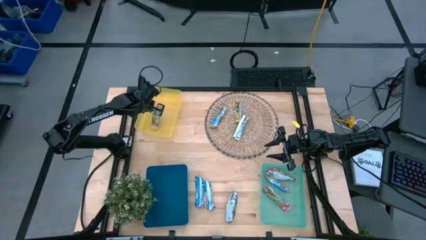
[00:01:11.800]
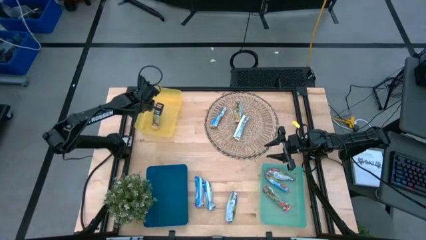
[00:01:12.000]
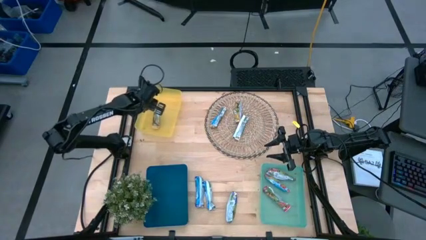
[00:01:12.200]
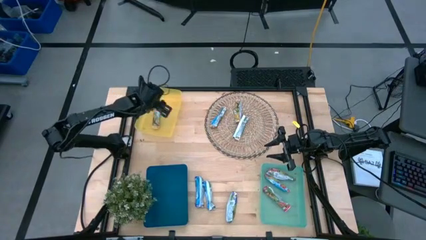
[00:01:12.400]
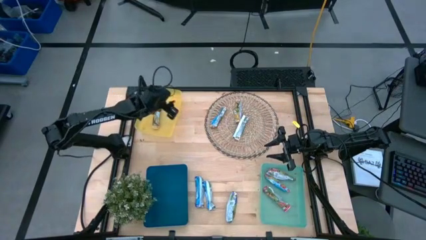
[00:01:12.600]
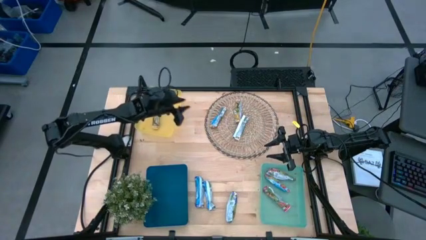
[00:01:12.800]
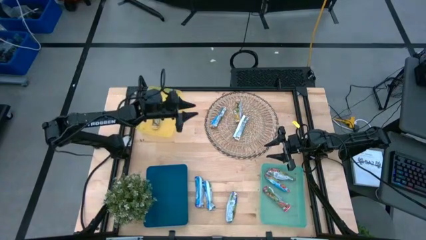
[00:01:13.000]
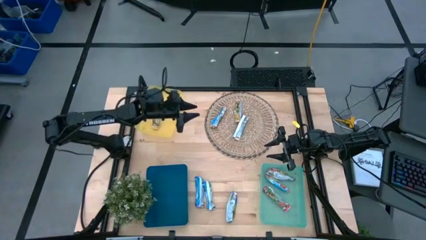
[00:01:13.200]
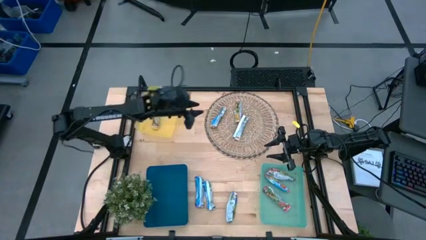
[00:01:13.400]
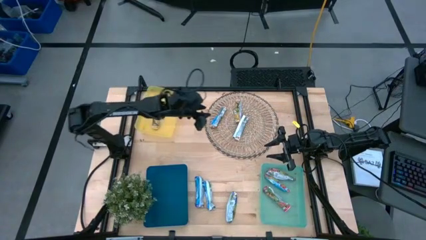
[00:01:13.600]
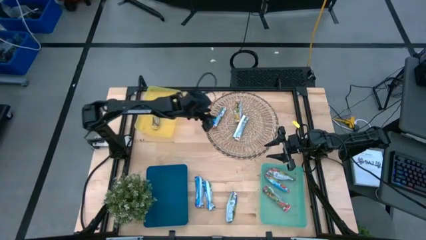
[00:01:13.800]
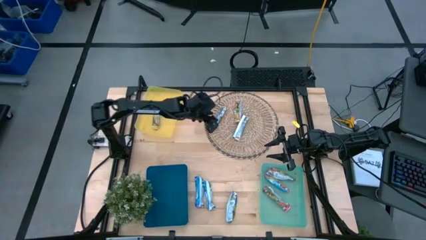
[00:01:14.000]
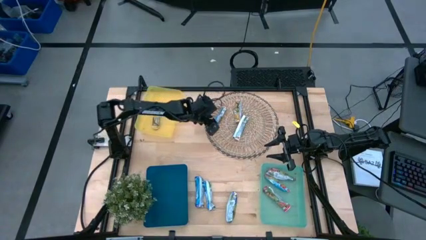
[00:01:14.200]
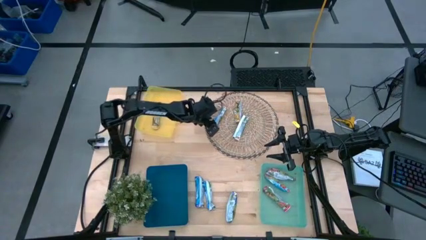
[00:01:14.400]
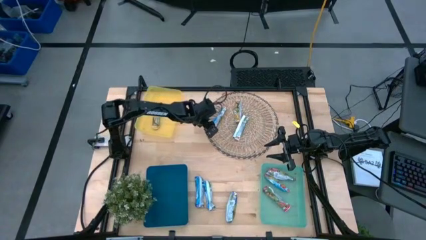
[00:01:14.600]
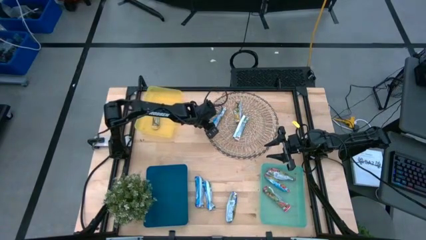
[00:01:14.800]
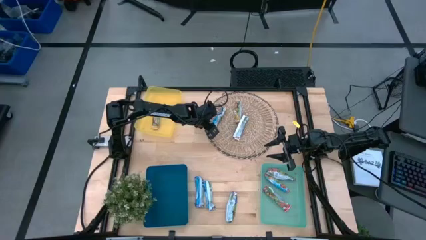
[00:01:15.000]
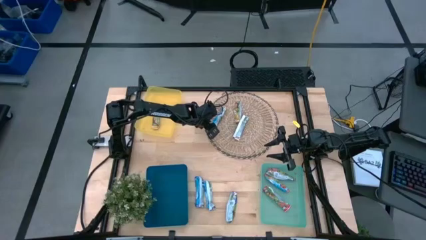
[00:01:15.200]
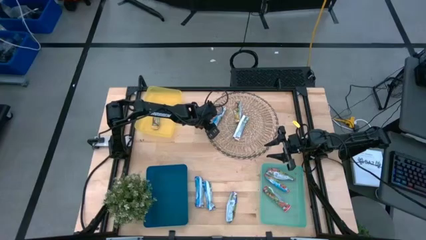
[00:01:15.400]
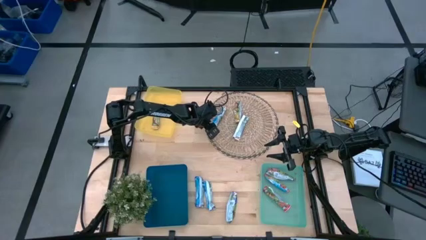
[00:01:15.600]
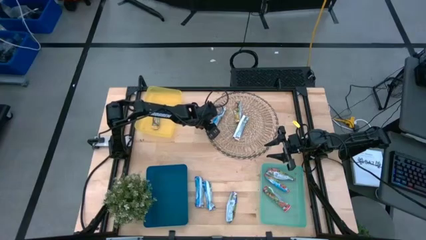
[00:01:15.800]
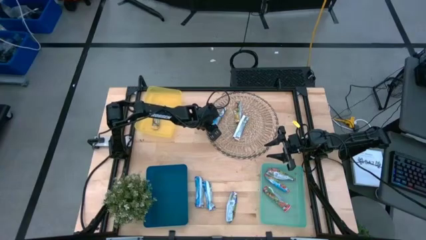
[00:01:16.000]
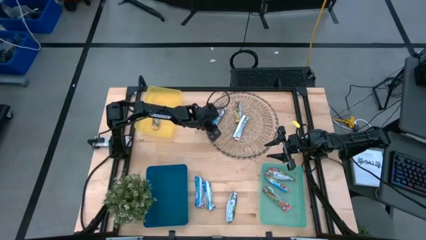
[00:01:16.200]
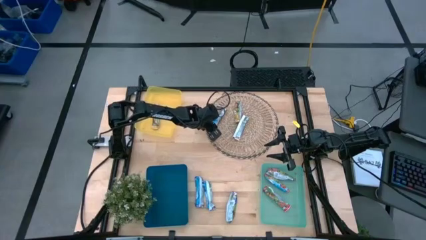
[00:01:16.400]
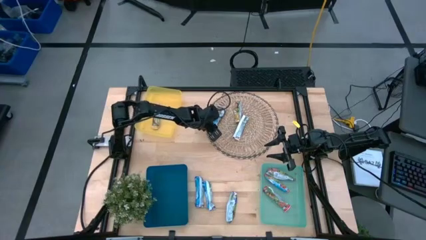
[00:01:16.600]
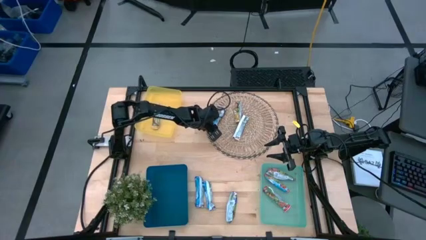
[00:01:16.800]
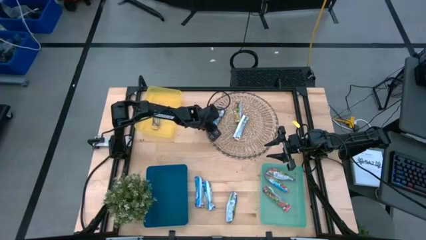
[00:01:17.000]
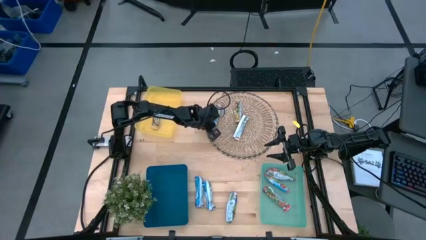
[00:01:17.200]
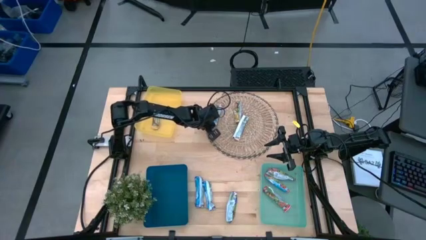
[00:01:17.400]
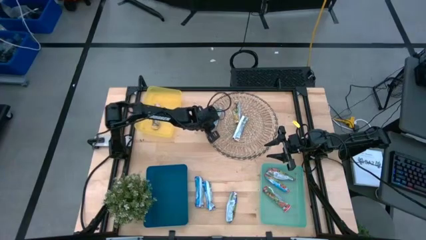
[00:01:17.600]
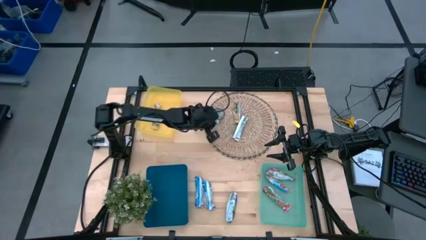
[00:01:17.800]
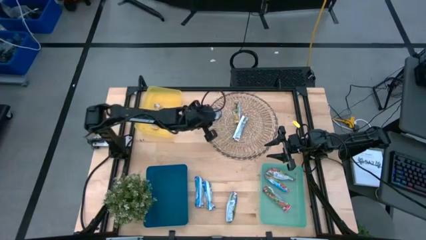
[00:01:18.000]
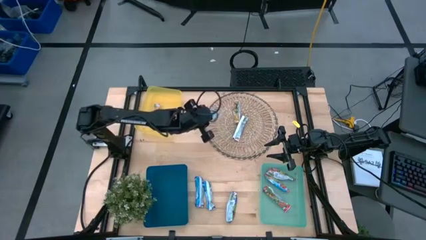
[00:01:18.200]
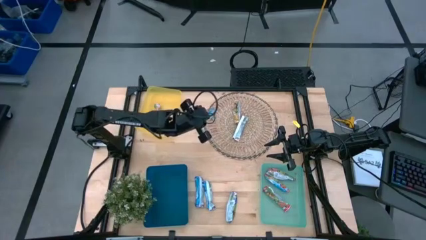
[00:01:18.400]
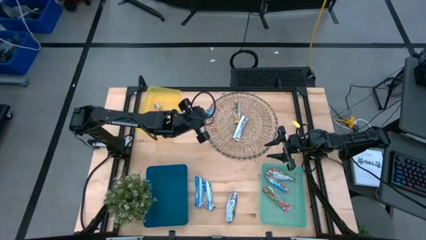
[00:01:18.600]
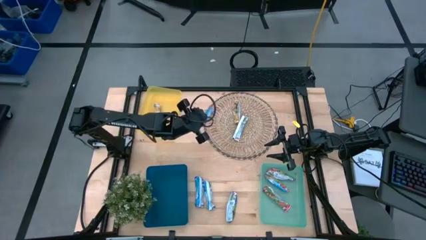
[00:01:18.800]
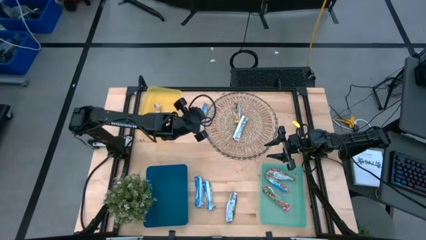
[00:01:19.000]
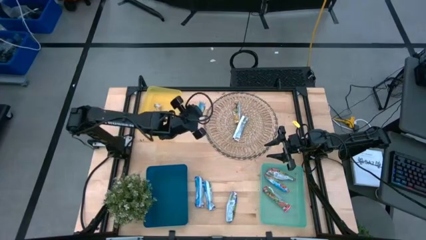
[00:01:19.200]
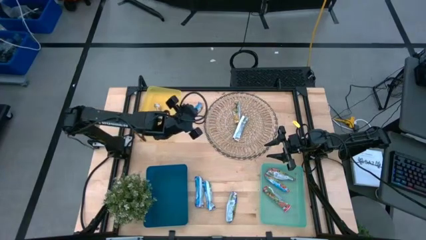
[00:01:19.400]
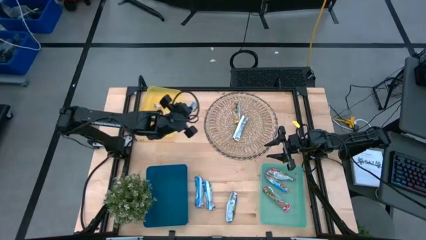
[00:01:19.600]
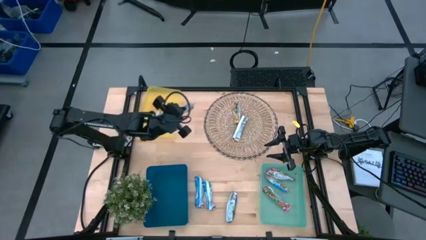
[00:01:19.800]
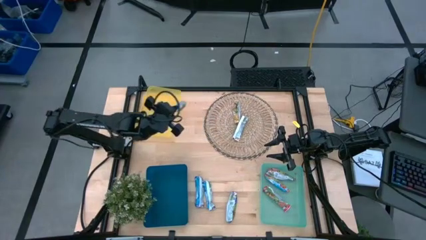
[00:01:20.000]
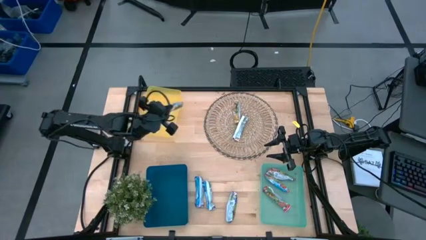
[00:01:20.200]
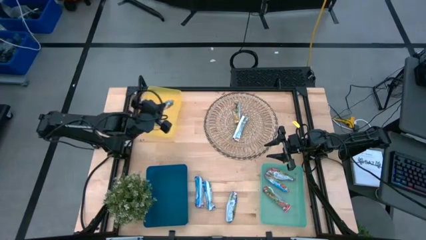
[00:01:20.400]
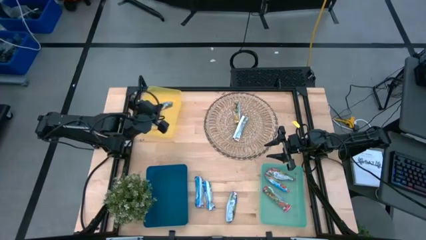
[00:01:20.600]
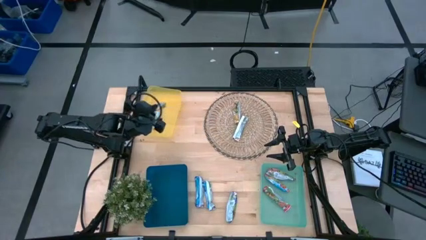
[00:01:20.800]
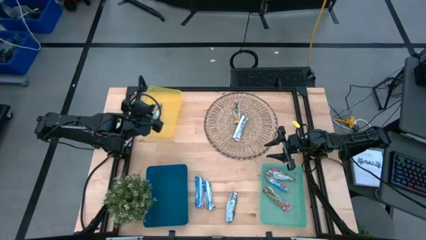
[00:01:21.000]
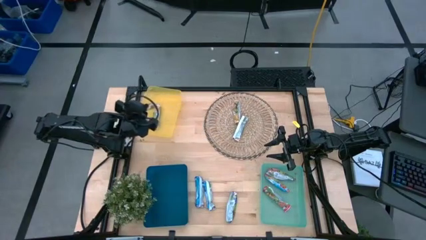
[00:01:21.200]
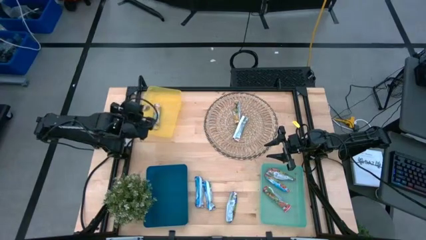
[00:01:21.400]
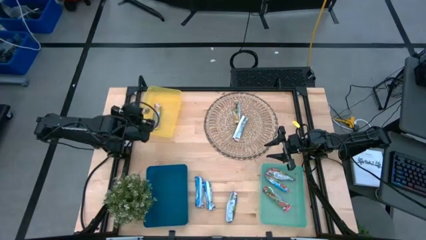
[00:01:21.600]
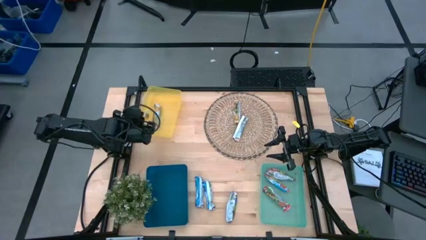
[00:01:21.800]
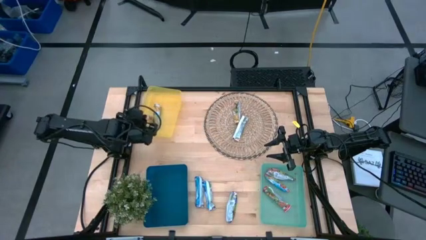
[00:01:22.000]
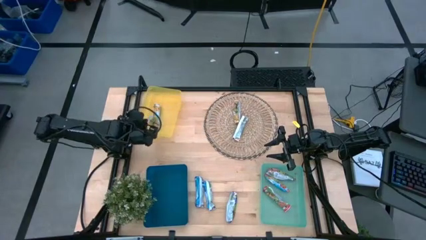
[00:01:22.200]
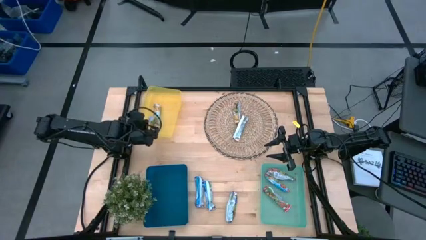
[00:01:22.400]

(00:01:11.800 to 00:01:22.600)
Task: Pick and place Granola Bars by type
Put the yellow granola bar into the yellow bin

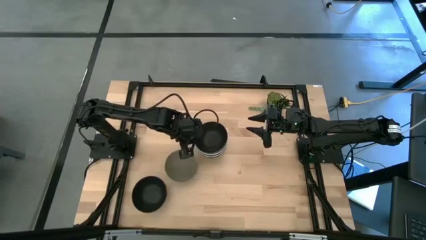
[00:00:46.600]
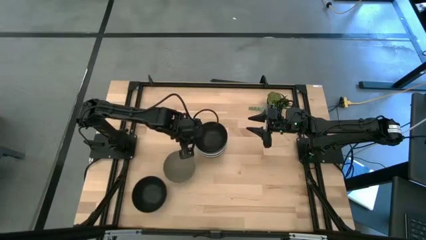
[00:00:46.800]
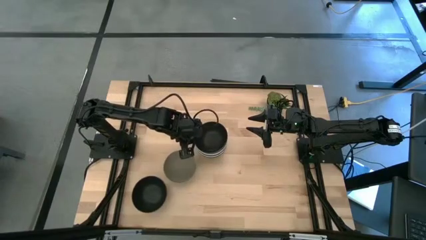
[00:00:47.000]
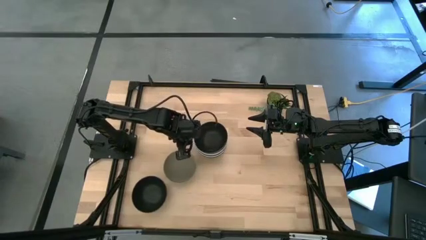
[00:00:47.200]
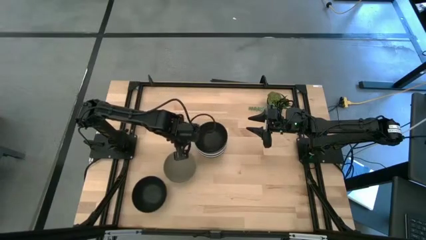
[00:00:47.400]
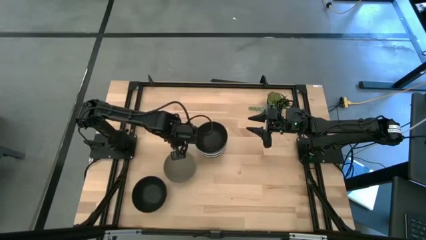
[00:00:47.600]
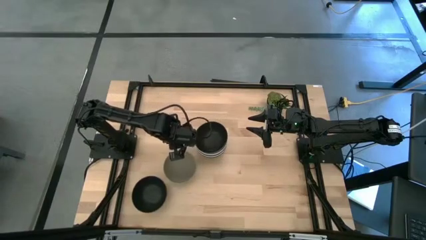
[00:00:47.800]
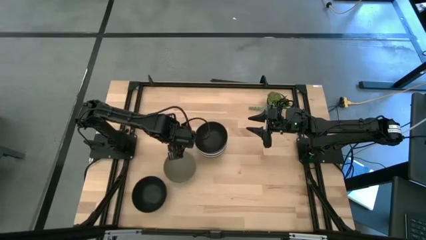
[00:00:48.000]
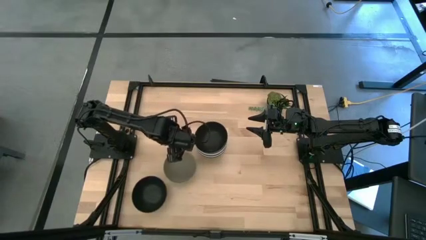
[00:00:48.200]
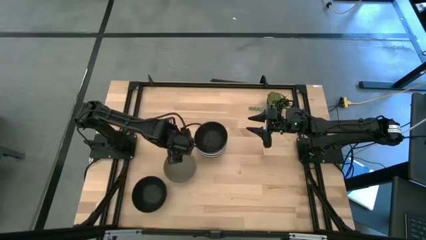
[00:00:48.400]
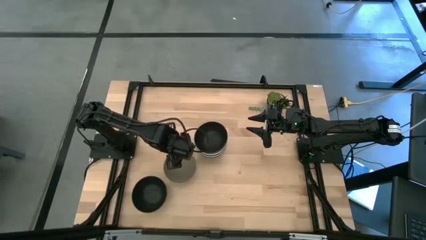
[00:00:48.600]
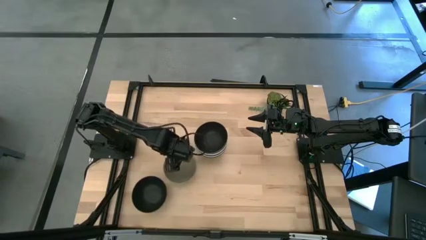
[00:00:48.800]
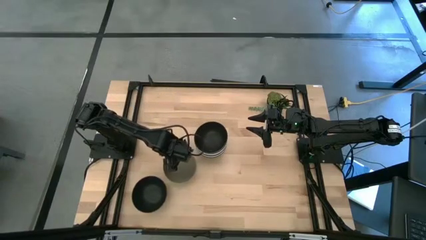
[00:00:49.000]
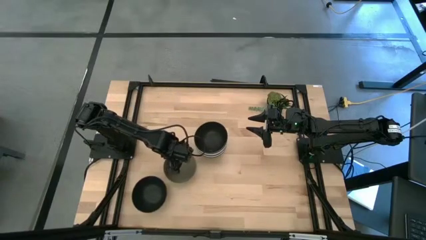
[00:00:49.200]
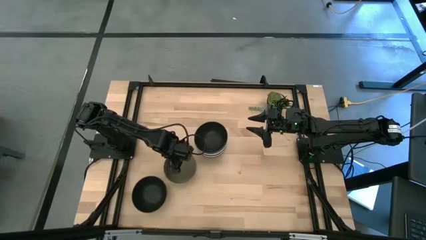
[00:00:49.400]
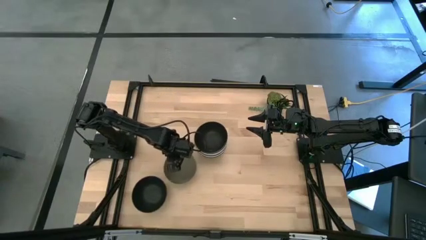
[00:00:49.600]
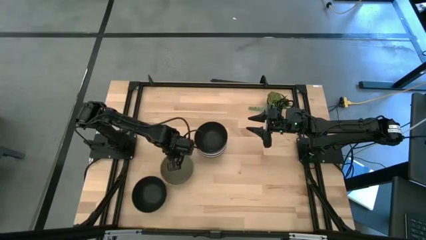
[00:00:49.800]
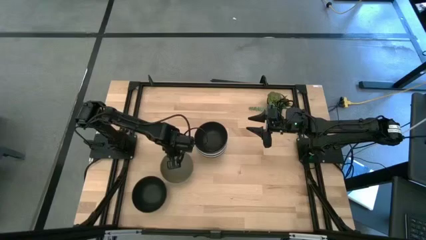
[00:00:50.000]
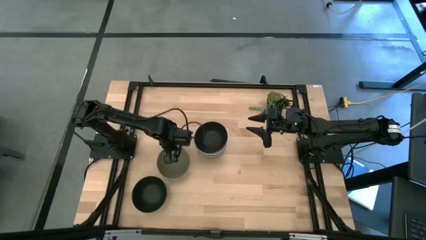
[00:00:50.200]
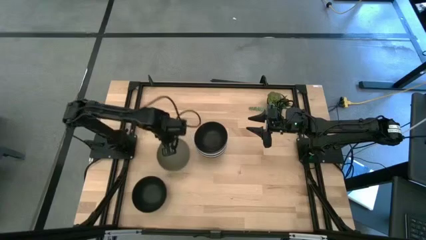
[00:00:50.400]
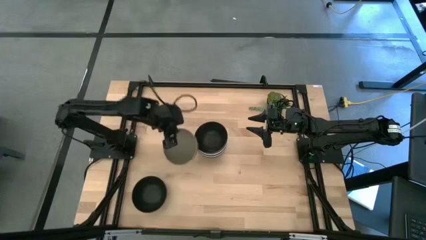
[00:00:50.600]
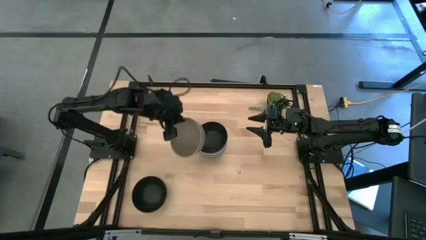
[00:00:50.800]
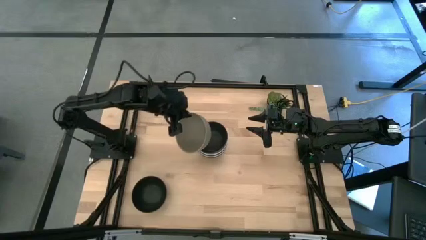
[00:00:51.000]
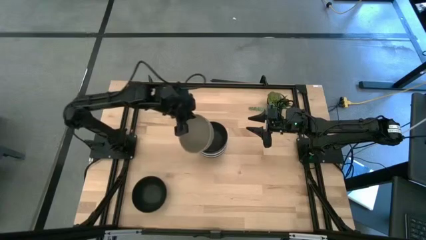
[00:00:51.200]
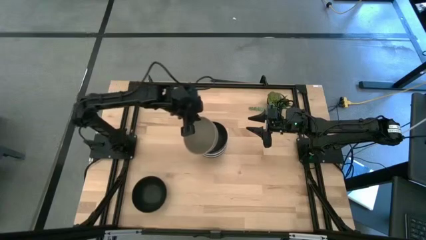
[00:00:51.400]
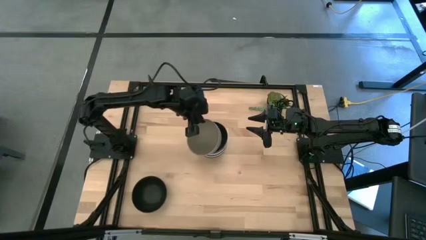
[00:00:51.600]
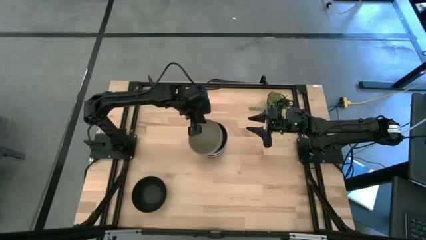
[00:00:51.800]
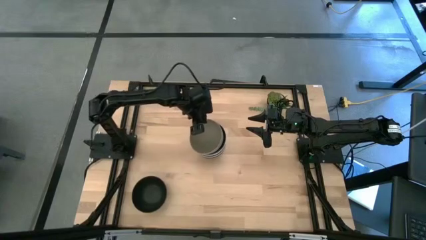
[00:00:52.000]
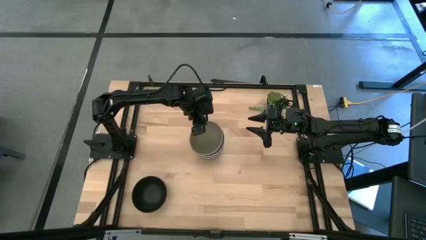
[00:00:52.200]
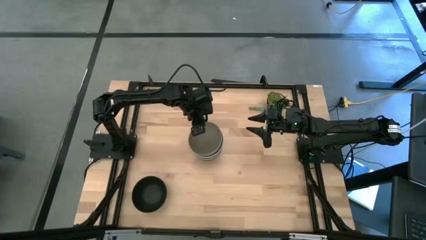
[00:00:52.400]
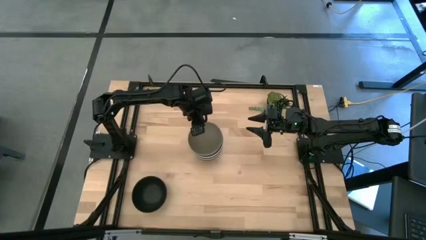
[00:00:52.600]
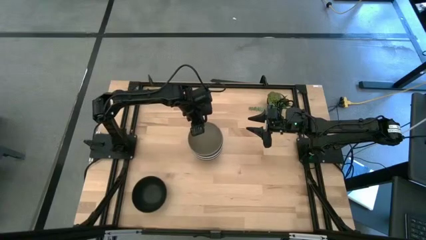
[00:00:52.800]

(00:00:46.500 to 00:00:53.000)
Task: Nest bowls inside each other
Stack the gray bowl on top of the black bowl
